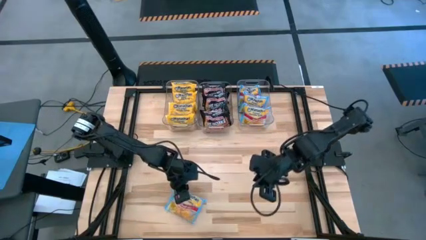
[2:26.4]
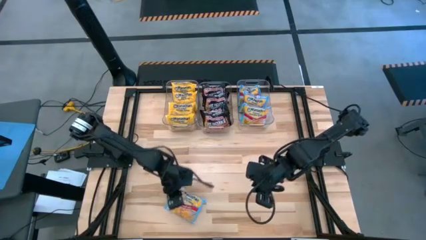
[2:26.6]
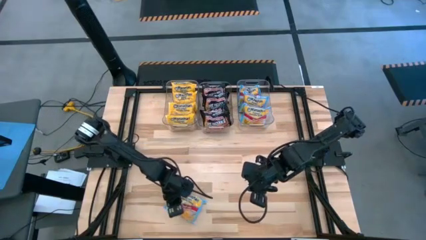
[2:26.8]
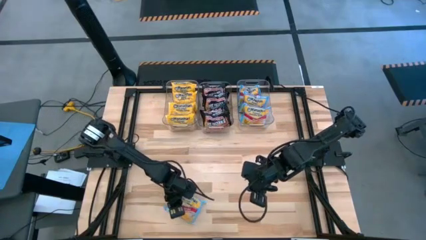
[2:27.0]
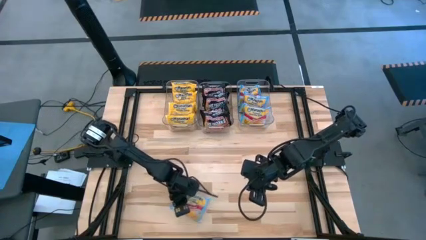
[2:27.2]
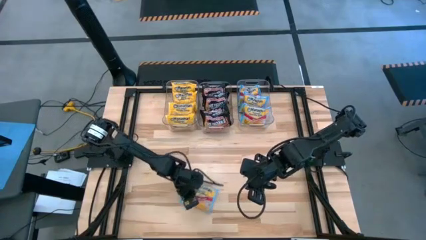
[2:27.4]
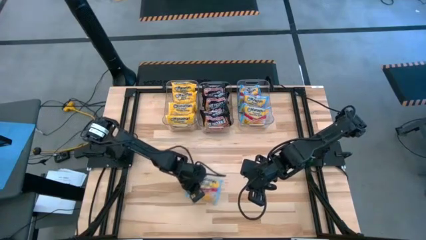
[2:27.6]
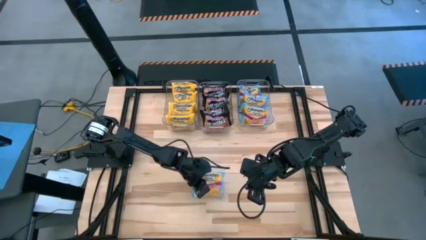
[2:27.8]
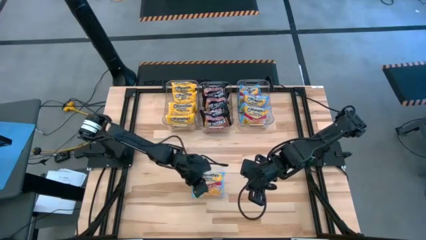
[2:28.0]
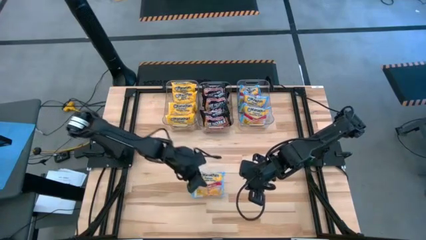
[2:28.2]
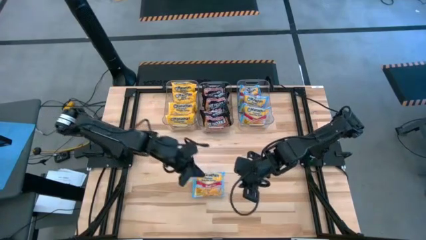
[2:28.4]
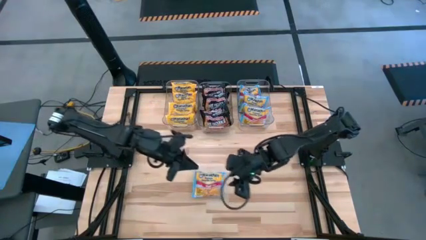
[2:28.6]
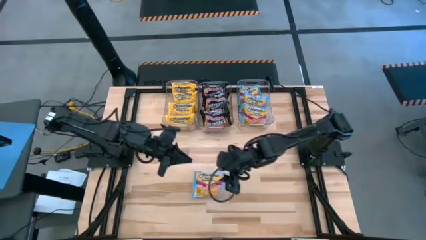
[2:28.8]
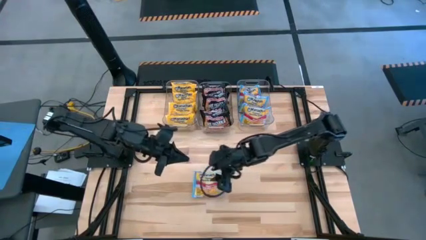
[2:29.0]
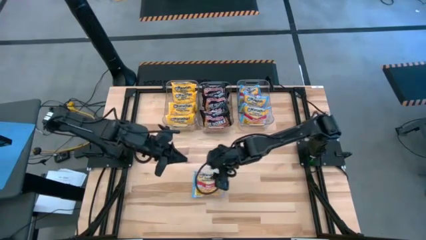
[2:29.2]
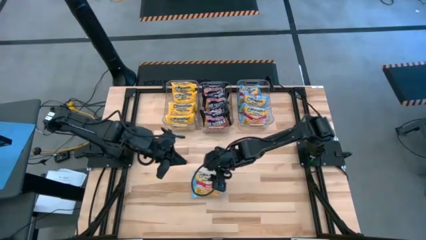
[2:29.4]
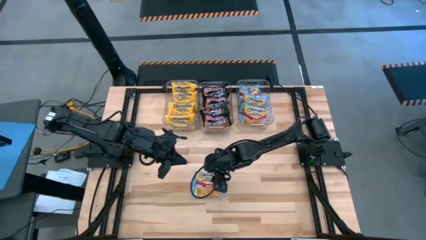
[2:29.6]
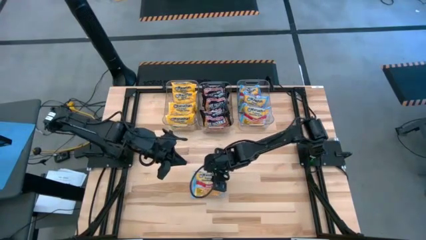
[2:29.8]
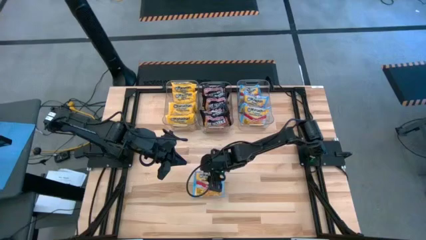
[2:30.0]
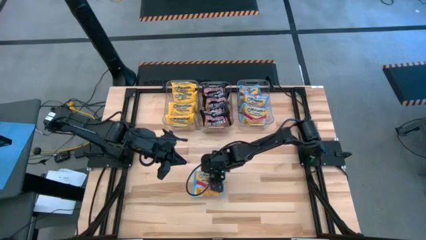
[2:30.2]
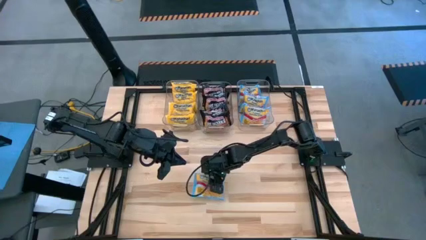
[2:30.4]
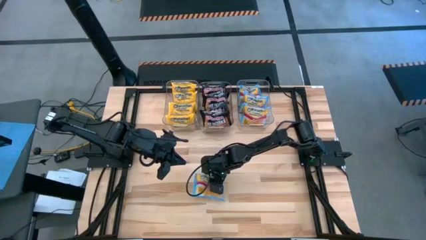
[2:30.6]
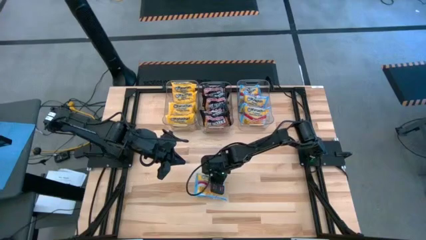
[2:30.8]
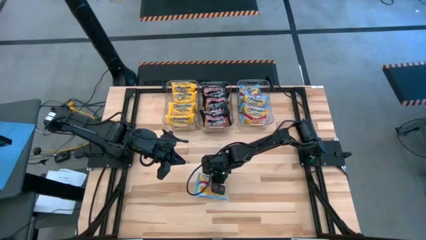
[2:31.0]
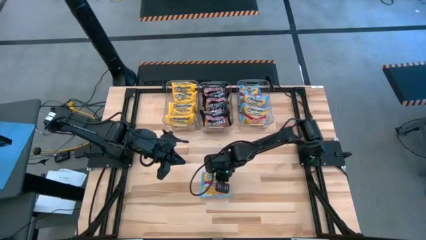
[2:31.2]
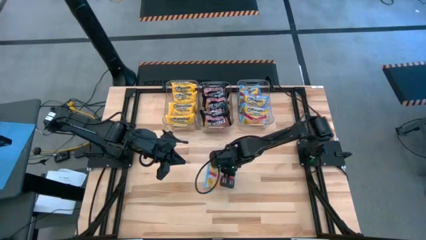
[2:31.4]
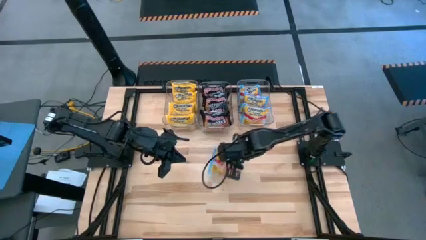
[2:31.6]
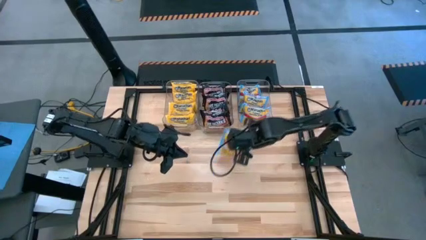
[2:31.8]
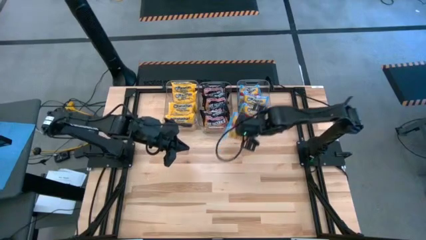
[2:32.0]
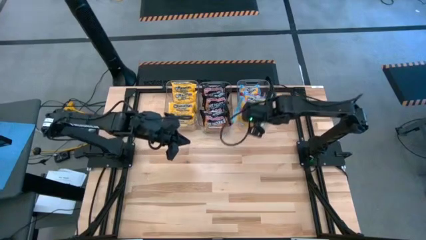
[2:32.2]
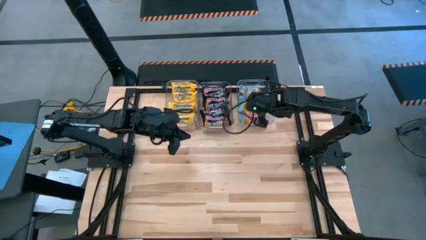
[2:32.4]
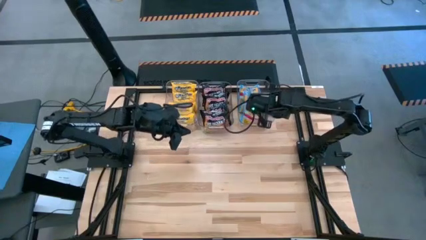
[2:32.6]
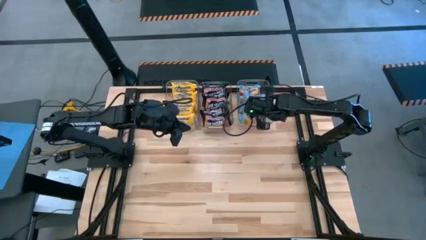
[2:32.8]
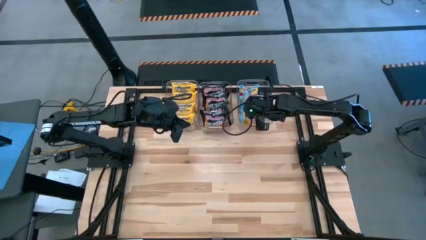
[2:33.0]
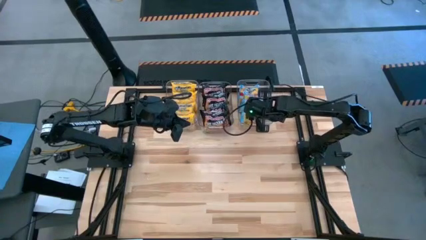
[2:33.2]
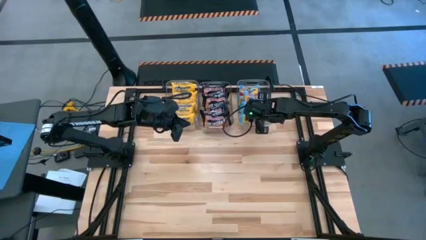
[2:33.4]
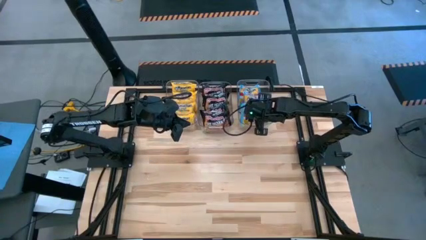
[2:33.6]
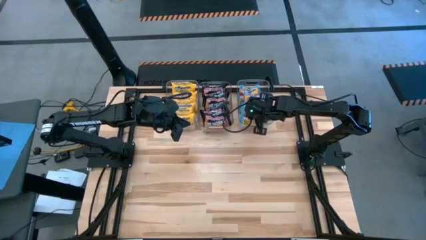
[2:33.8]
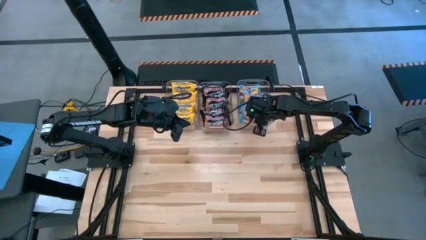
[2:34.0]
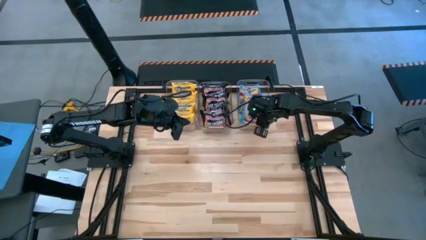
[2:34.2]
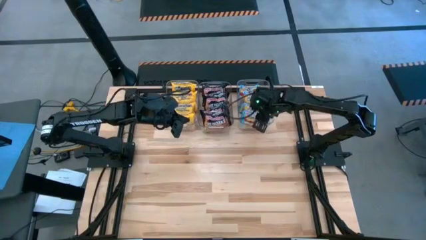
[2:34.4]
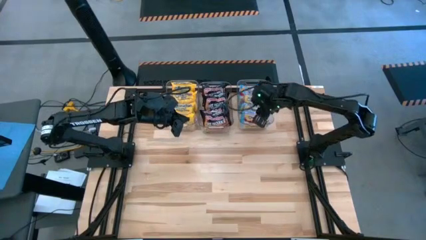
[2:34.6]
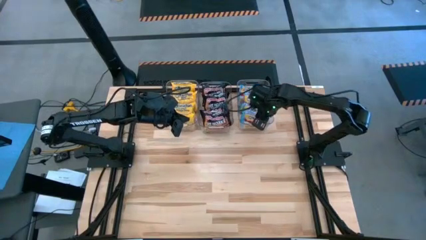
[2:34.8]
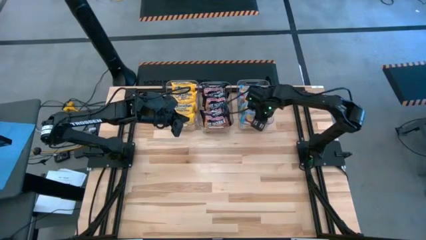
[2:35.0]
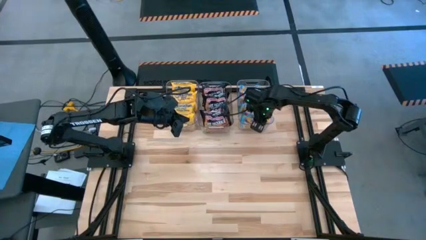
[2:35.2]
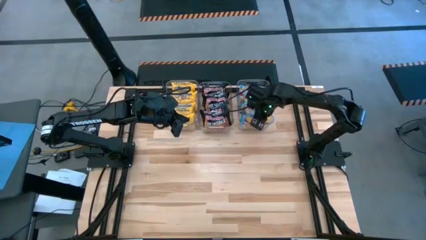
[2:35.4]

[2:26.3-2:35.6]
Task: Sort Maruchan noodles
Put the blue noodle pack in the right transparent bin

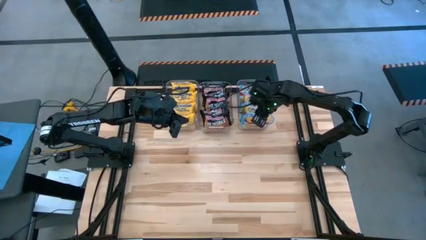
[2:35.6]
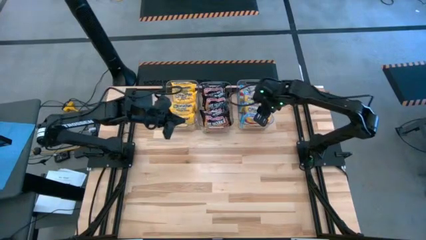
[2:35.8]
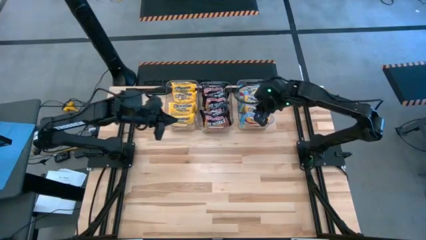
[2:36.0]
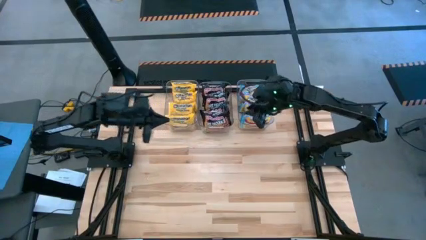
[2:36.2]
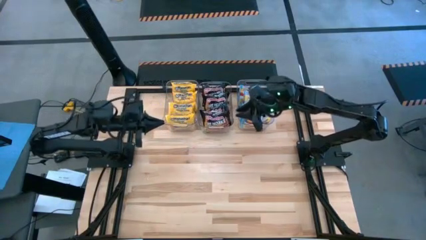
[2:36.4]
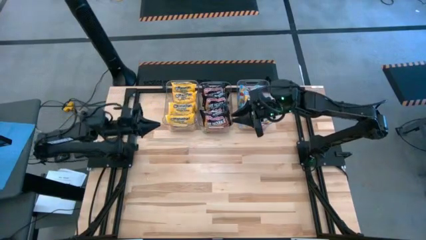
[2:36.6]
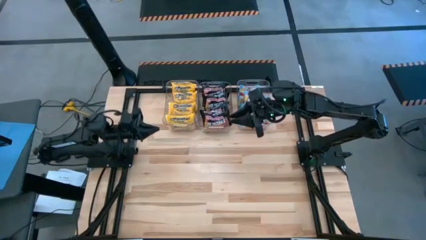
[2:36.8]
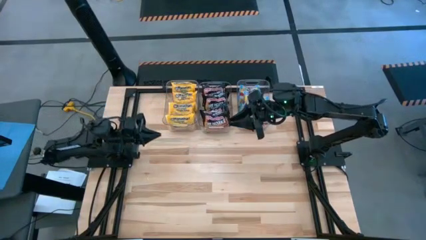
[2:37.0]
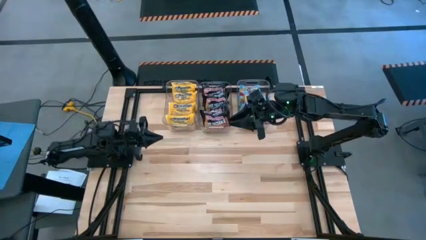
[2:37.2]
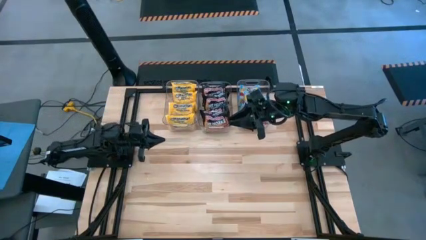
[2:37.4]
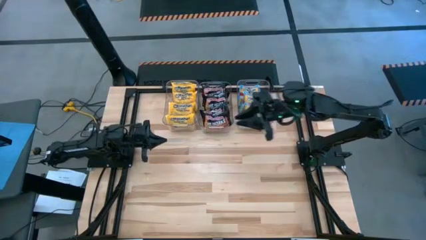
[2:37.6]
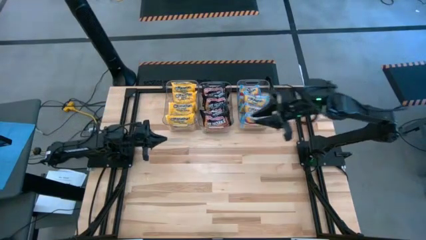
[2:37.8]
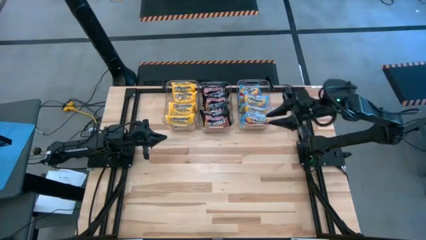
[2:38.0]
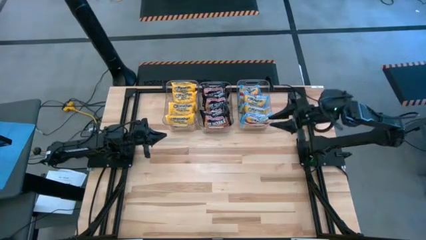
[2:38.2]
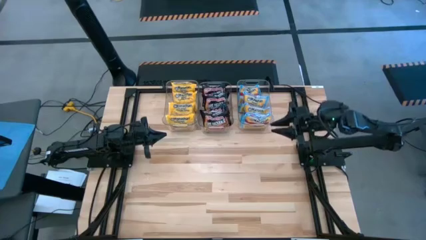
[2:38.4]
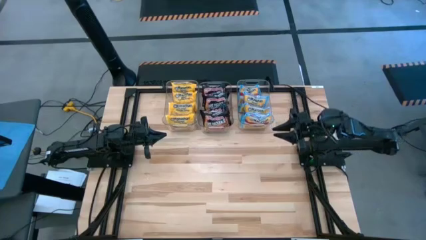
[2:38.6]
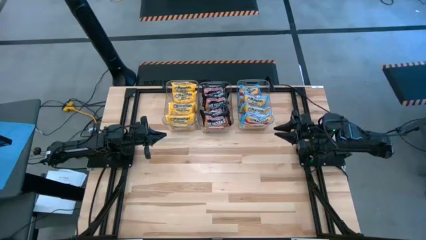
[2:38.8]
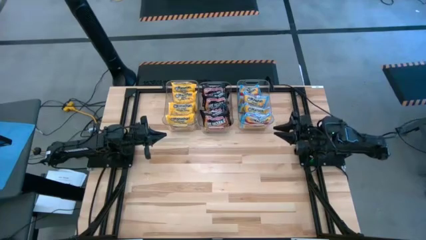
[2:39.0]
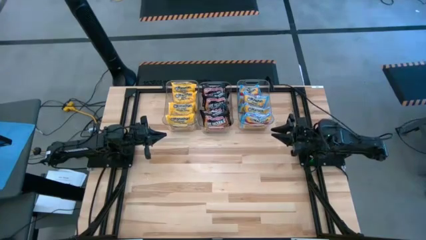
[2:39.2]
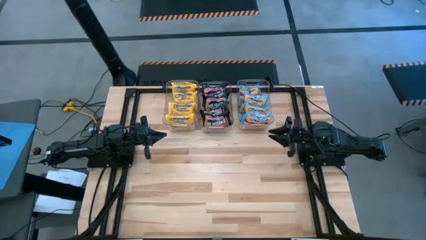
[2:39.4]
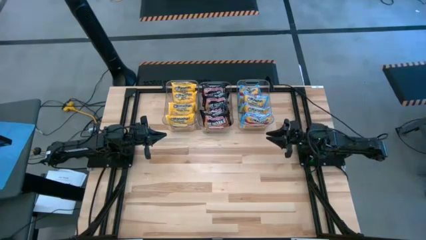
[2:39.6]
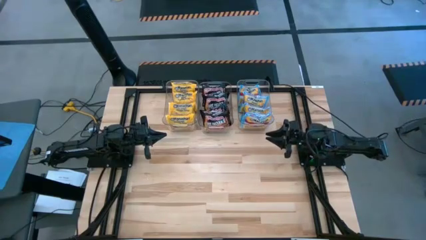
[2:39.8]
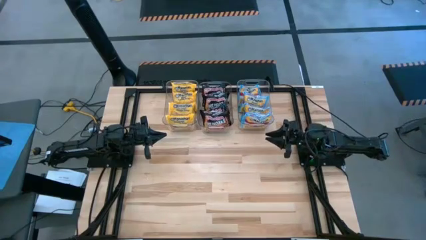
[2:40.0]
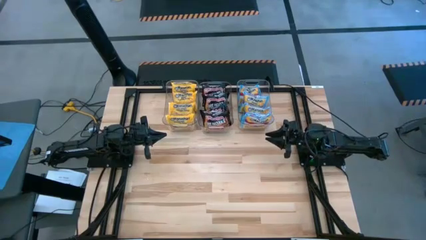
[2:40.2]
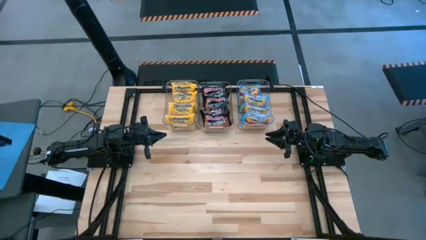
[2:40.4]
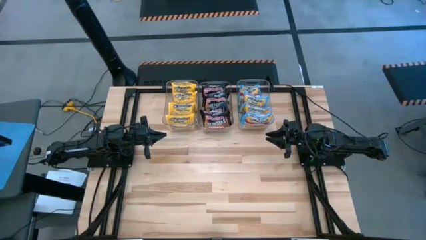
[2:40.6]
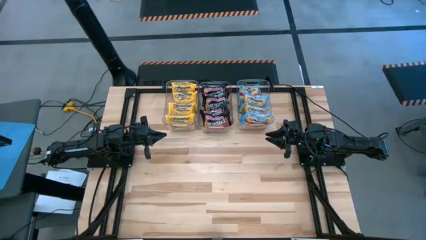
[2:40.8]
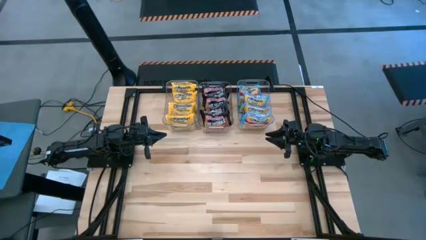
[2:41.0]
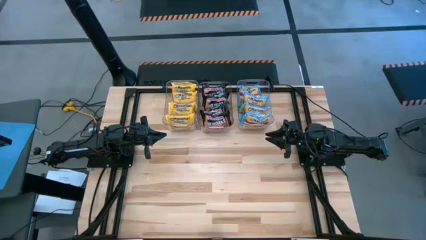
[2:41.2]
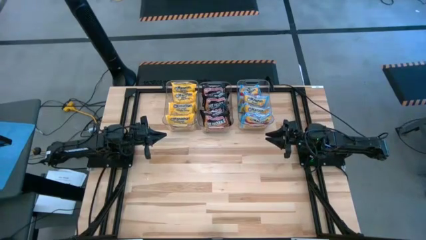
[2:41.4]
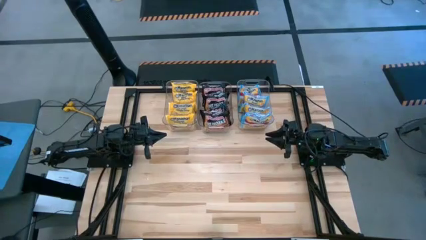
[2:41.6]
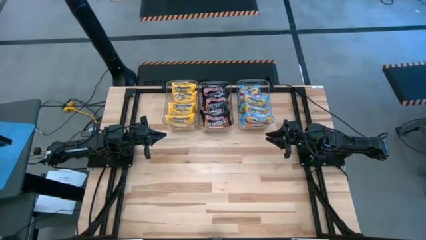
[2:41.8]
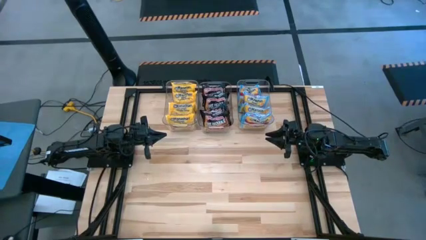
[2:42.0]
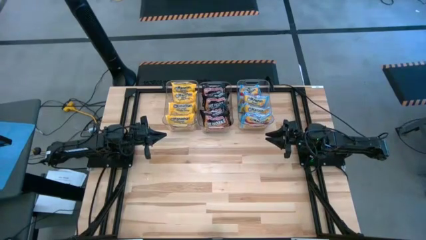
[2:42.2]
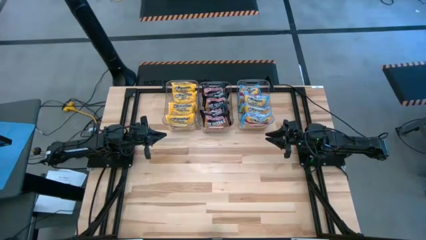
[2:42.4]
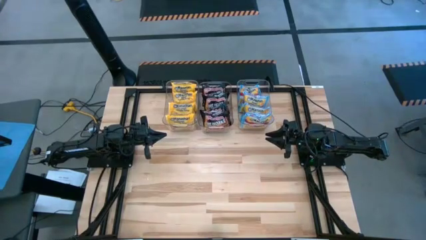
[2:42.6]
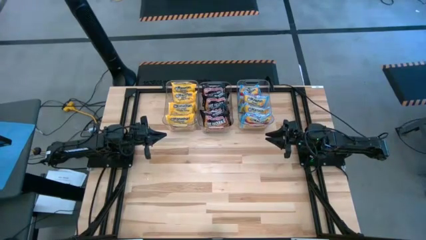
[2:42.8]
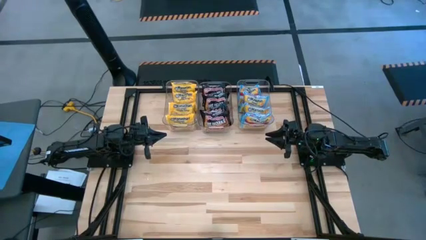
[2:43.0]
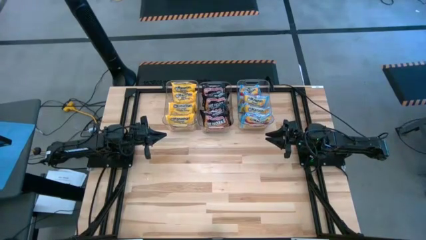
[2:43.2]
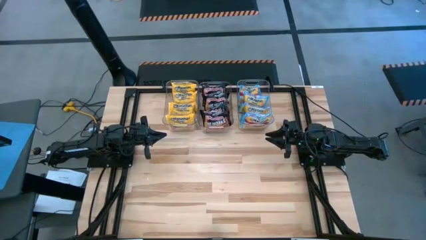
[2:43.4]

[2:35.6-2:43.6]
Return to Home Position
